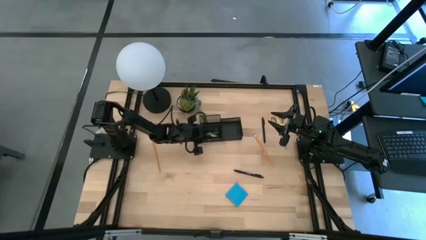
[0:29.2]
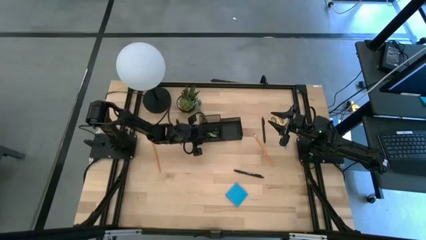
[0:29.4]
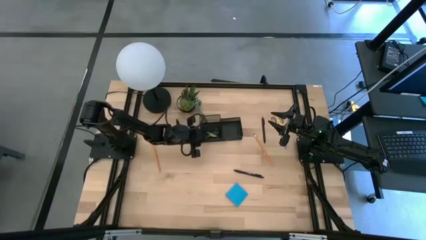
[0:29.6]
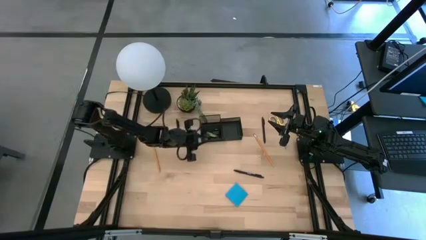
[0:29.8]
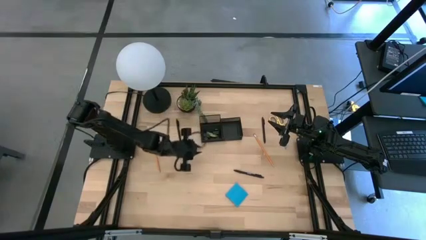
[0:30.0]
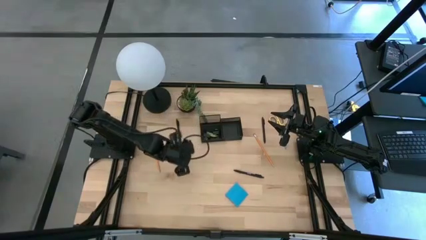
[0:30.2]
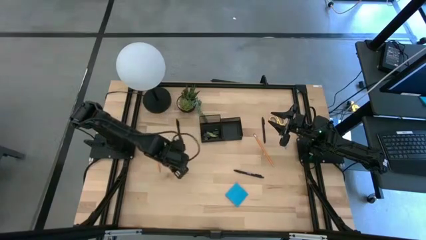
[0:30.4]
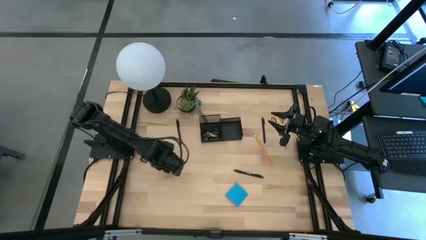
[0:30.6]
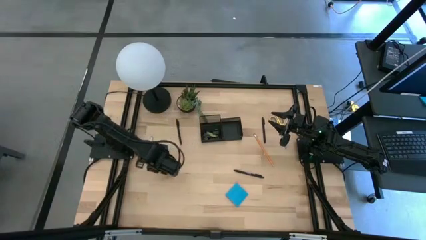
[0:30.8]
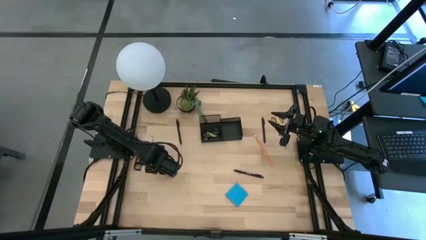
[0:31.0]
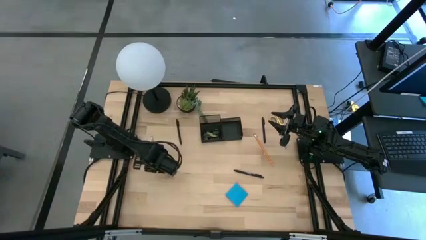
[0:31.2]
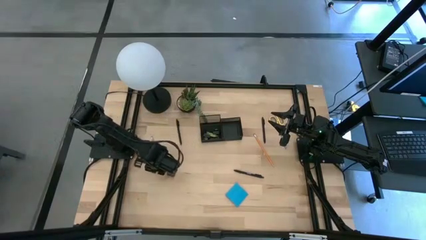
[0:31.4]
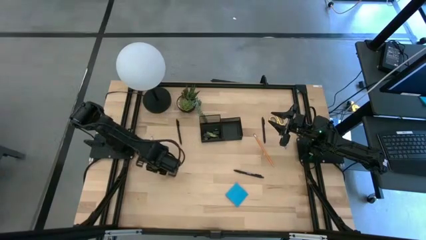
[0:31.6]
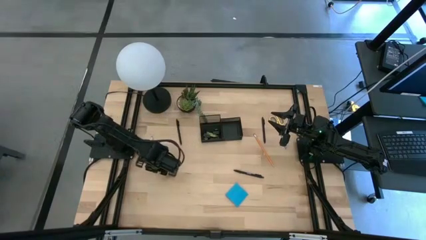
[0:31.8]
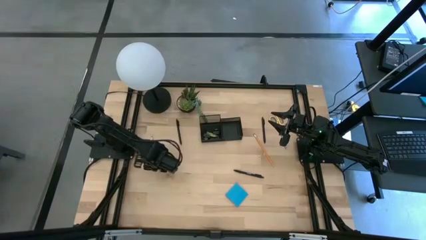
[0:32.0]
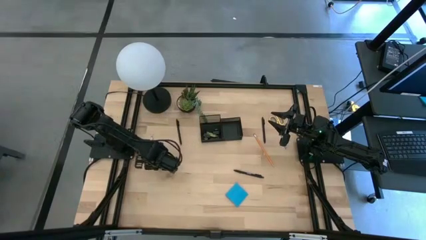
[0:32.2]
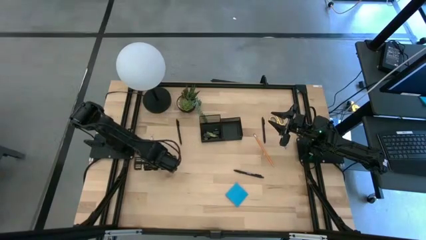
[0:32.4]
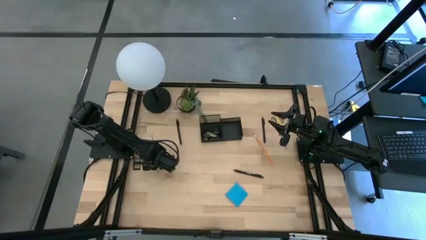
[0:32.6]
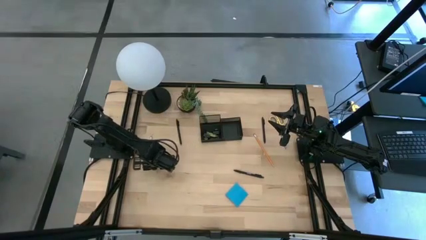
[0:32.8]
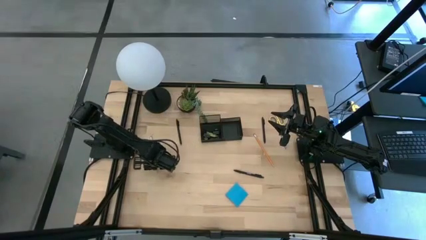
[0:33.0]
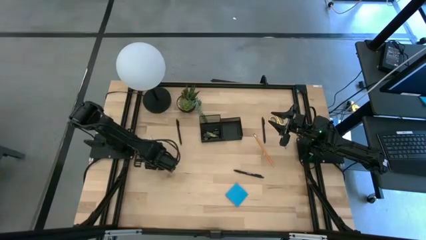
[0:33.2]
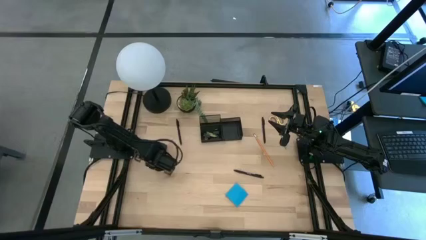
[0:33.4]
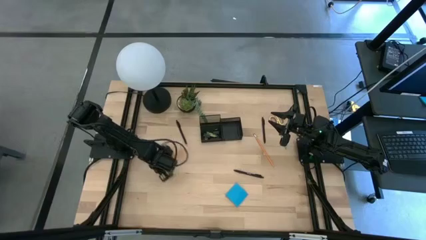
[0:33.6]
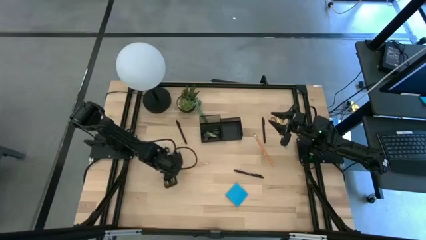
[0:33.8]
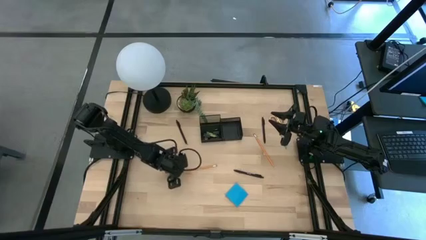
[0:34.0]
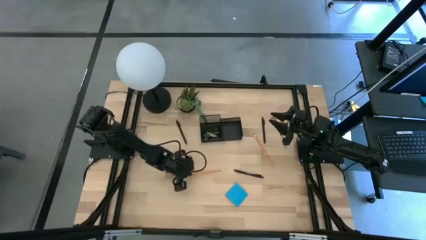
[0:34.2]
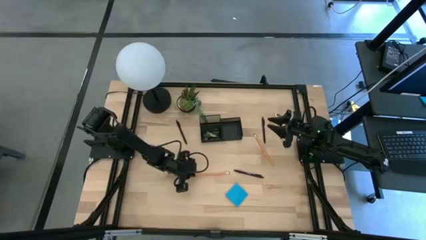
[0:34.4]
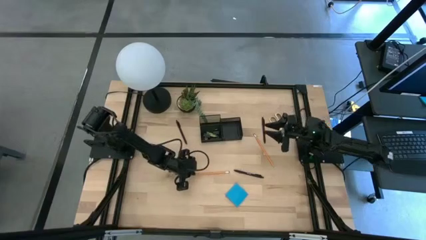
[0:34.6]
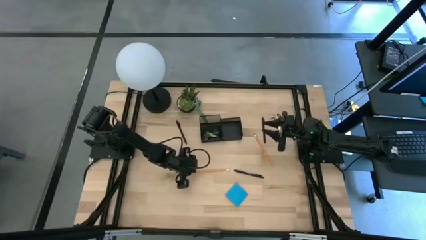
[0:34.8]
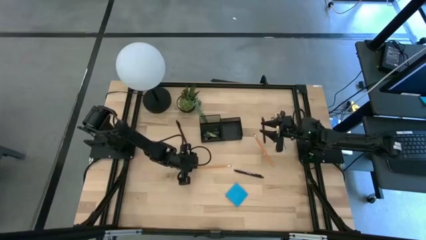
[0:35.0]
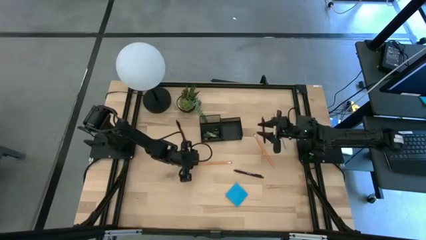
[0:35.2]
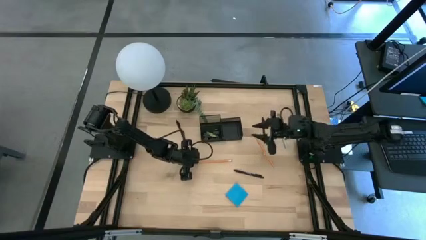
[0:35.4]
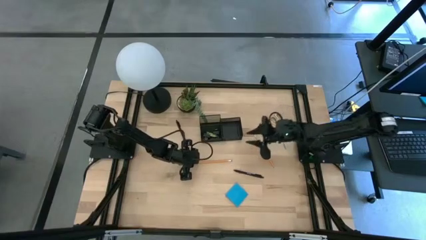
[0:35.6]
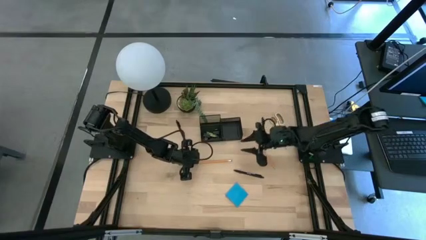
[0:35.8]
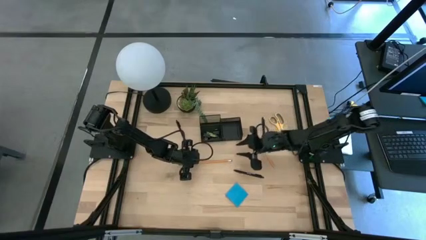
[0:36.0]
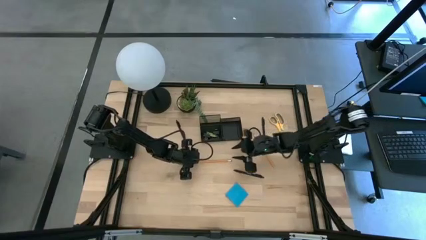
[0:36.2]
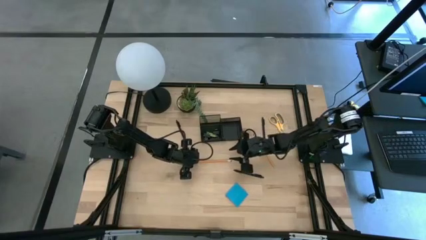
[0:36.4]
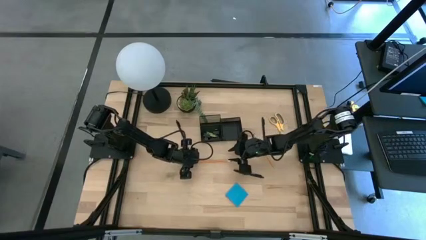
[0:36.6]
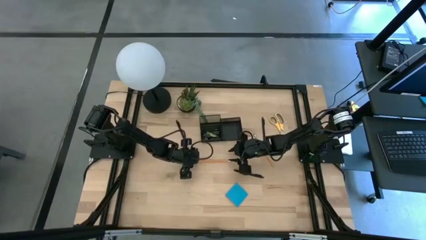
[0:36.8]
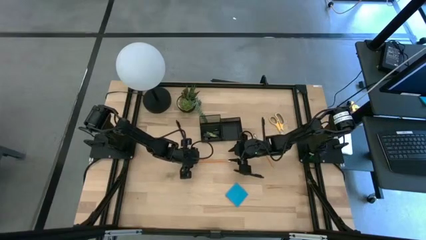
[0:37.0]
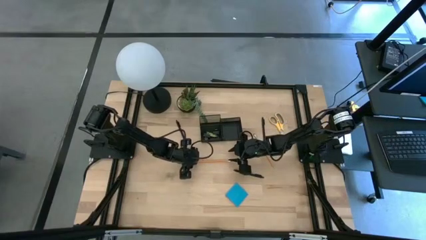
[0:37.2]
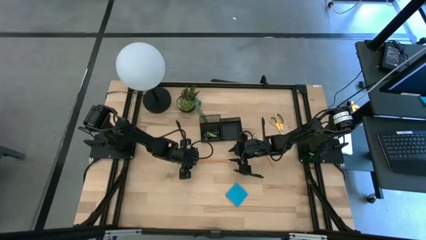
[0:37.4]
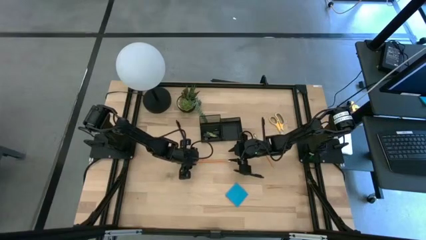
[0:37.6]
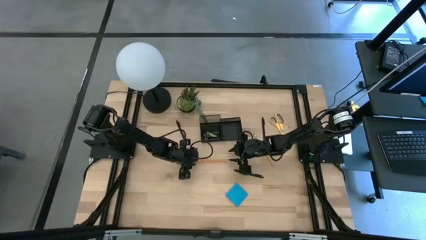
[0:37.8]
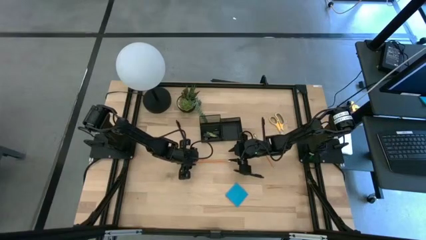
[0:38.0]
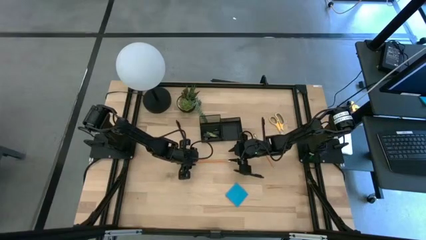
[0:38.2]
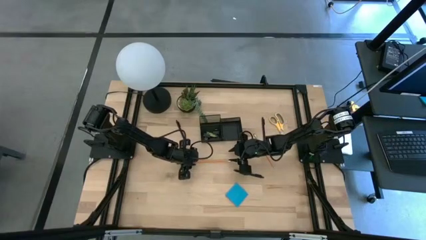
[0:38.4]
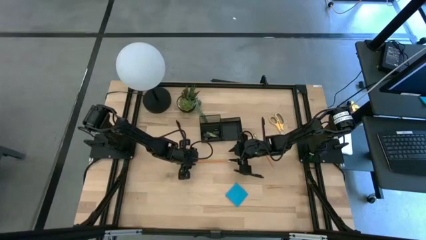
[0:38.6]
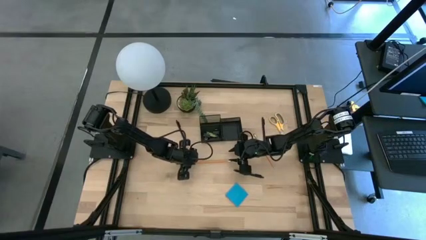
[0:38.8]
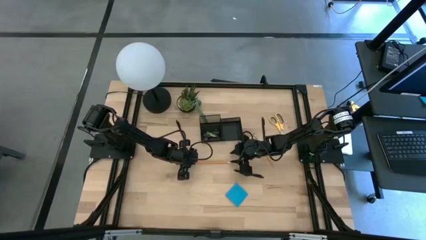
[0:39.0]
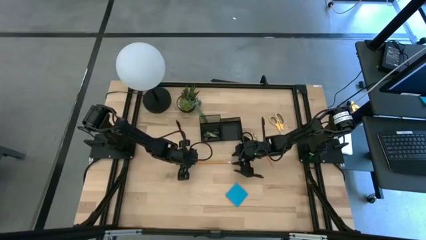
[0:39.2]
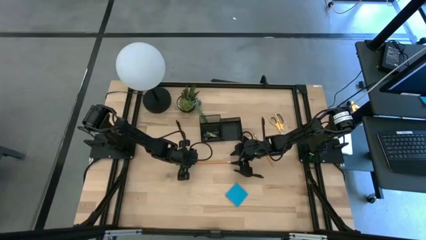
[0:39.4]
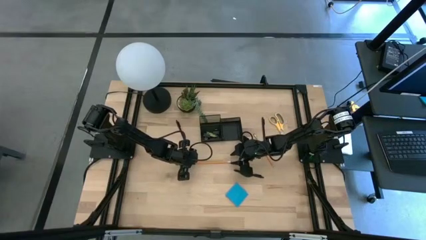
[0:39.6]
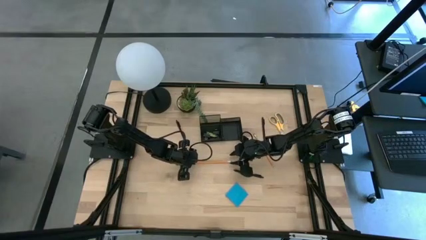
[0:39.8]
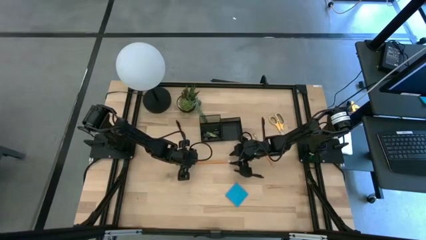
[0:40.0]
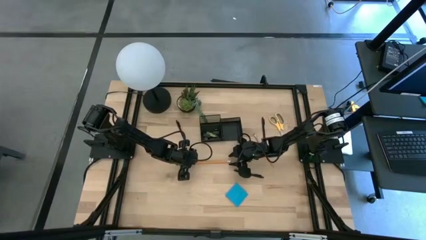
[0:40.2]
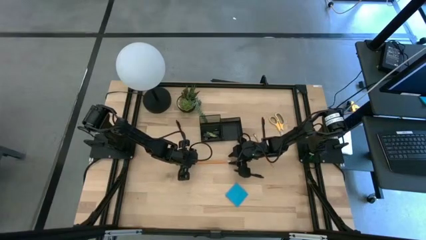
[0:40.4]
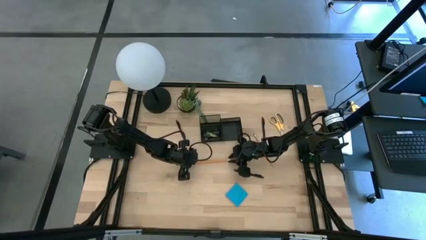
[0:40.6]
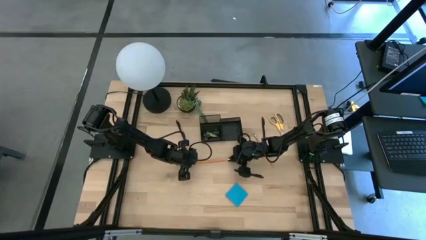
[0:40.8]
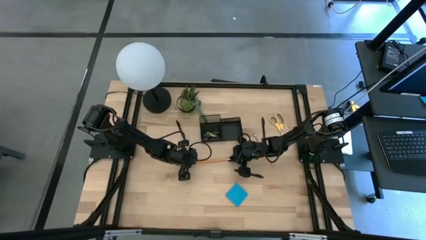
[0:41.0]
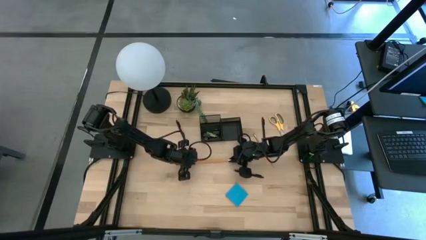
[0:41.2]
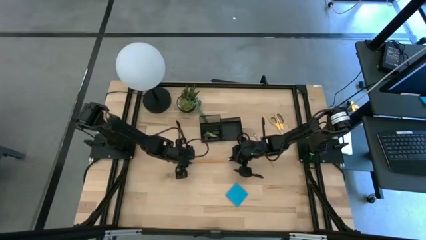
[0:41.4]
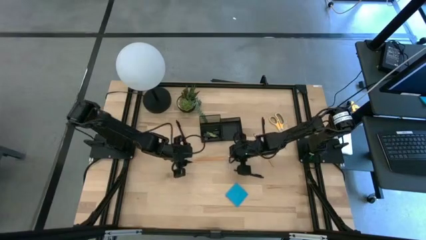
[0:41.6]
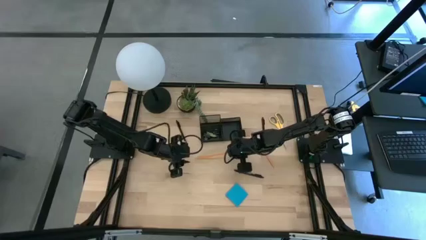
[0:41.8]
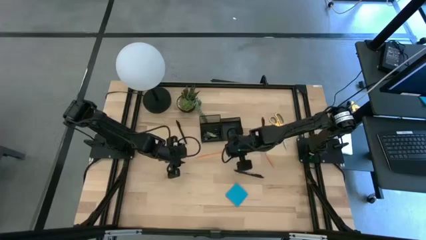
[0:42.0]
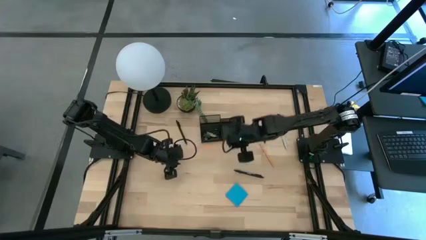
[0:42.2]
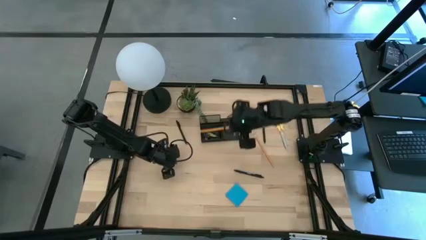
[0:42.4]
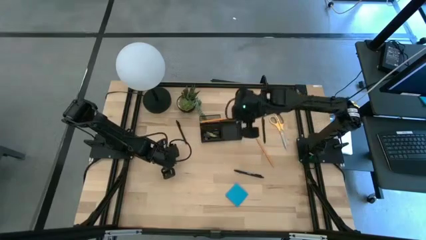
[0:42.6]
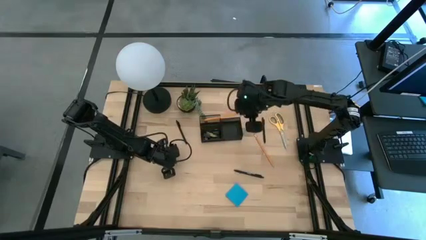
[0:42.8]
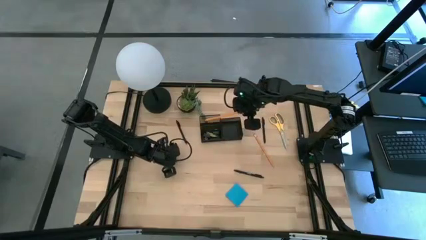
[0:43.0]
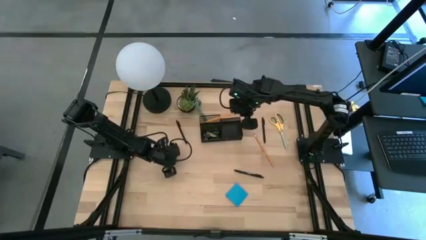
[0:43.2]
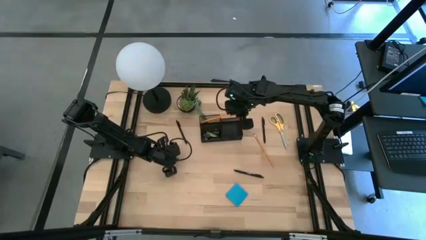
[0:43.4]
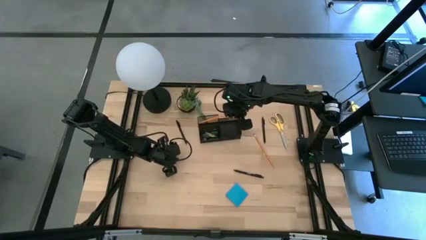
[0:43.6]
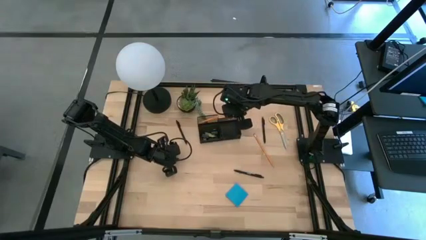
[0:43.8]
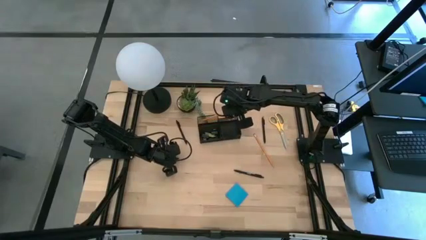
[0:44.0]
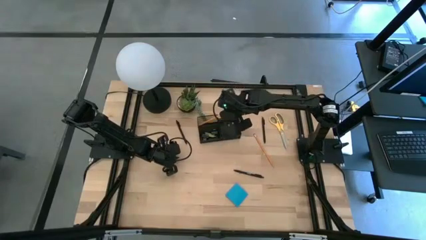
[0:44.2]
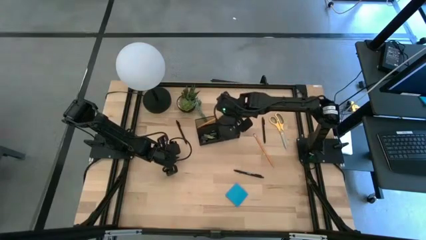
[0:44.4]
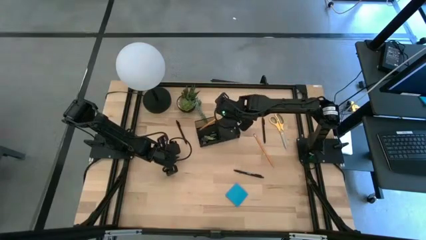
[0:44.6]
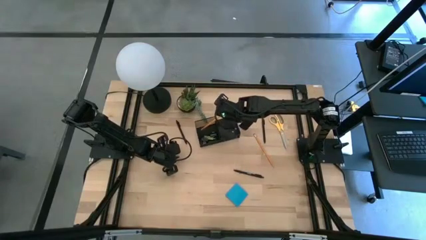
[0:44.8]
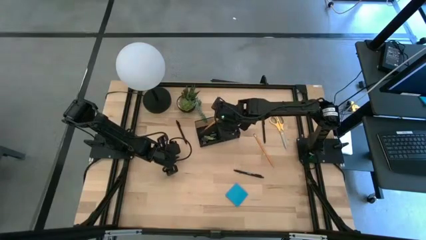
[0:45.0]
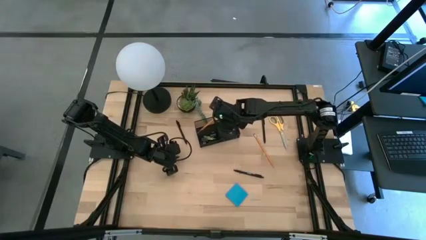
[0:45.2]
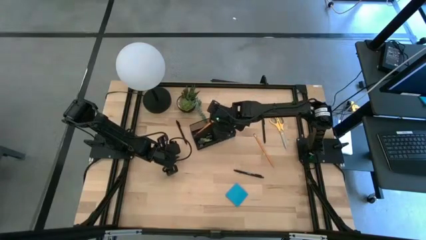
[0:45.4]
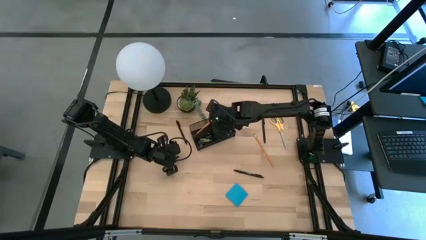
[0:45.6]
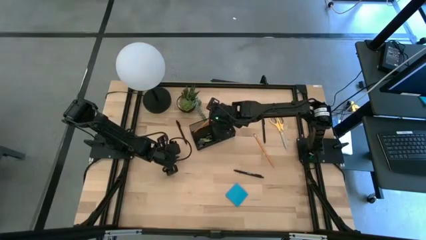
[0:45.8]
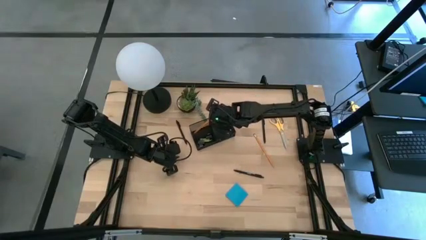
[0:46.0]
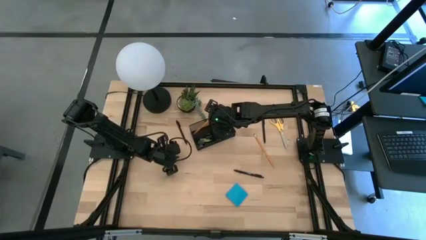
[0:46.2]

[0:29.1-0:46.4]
Task: Pick and place office supplies into organizer
Put the left yellow pencil into the desk organizer
